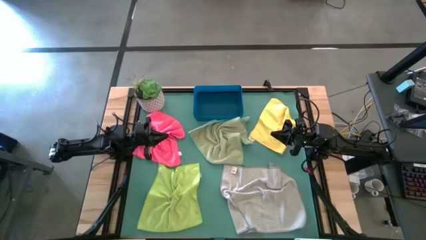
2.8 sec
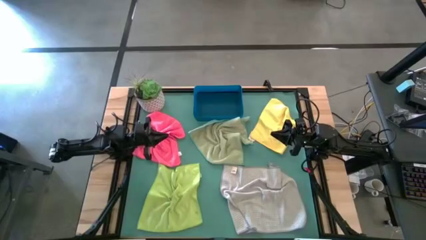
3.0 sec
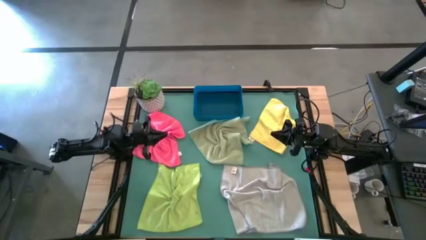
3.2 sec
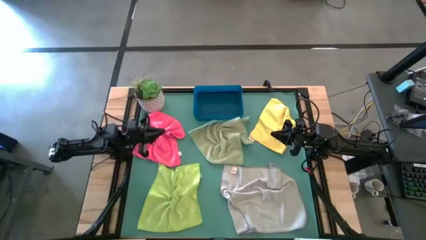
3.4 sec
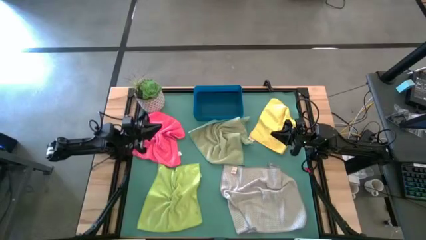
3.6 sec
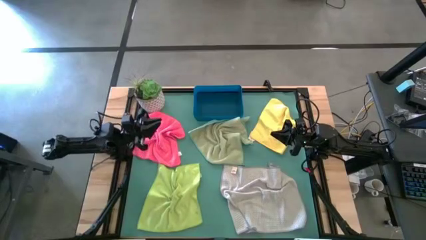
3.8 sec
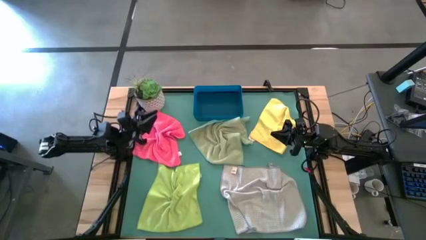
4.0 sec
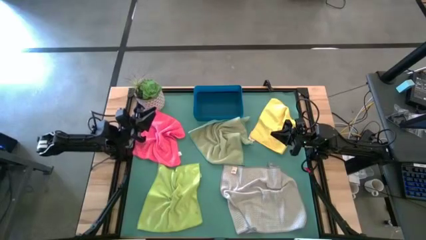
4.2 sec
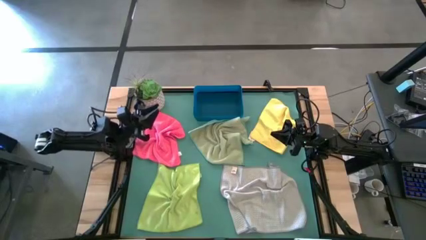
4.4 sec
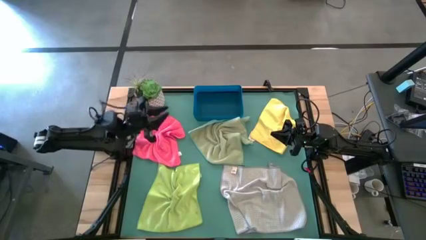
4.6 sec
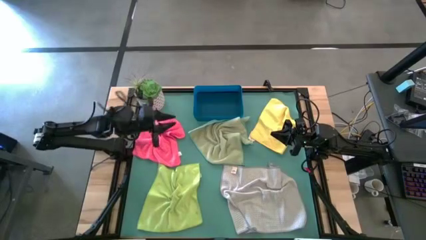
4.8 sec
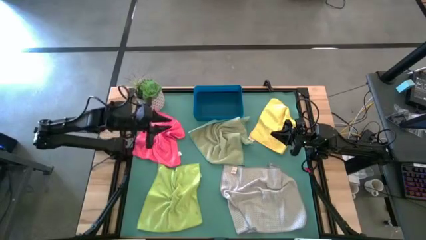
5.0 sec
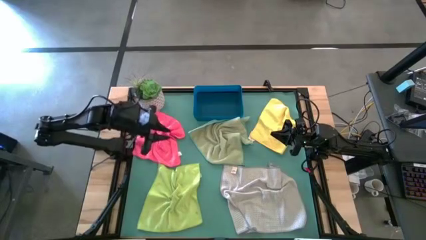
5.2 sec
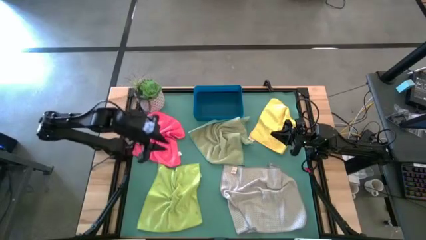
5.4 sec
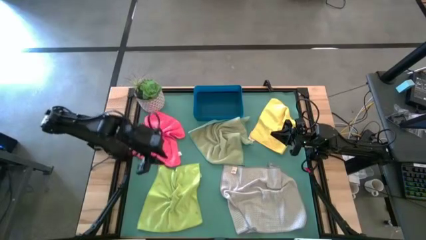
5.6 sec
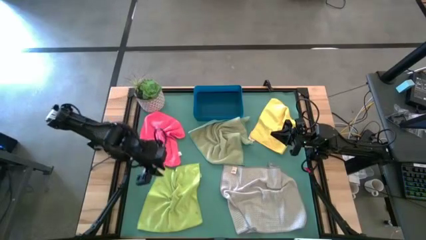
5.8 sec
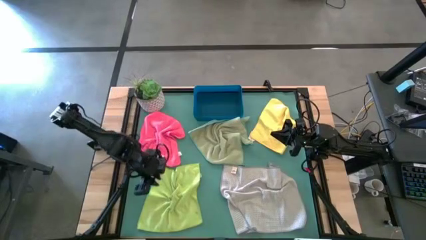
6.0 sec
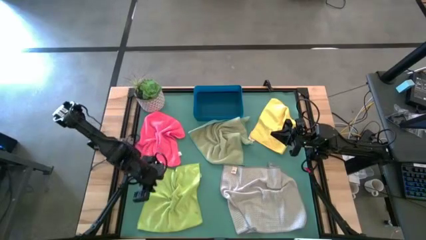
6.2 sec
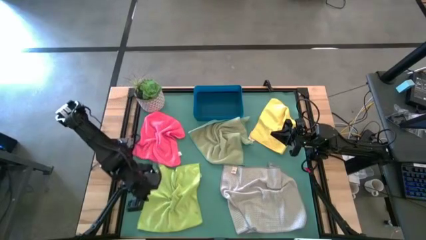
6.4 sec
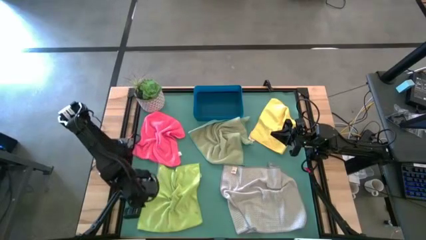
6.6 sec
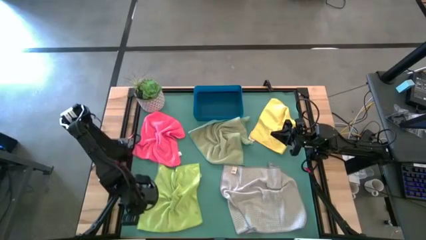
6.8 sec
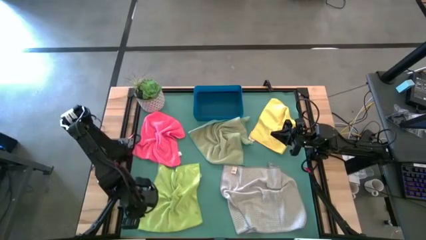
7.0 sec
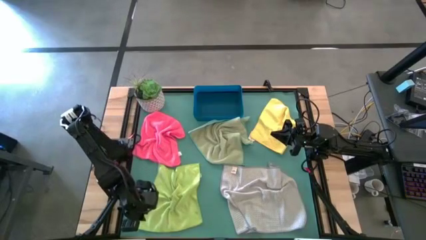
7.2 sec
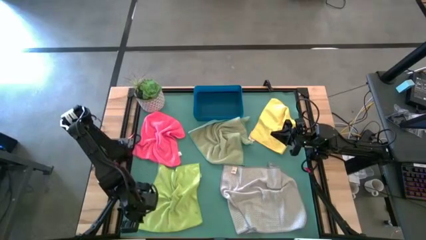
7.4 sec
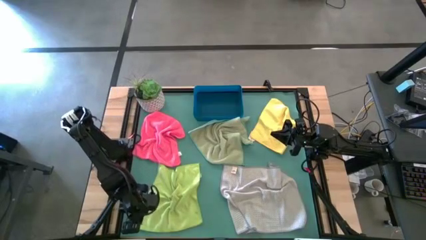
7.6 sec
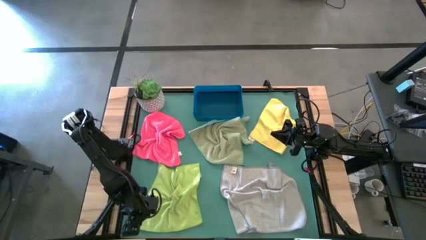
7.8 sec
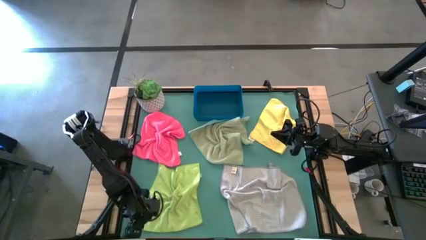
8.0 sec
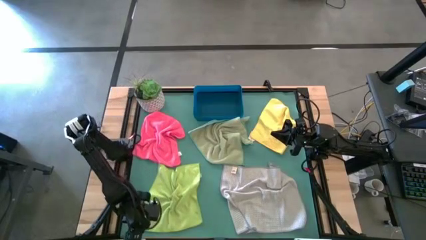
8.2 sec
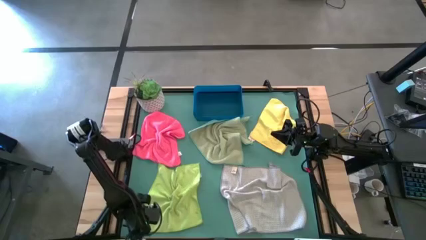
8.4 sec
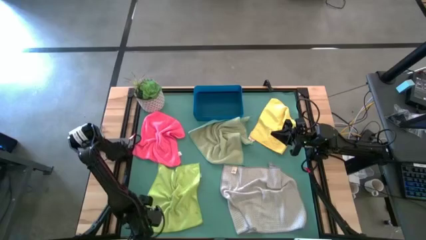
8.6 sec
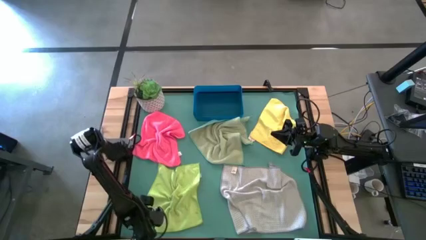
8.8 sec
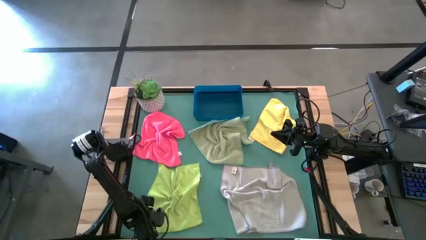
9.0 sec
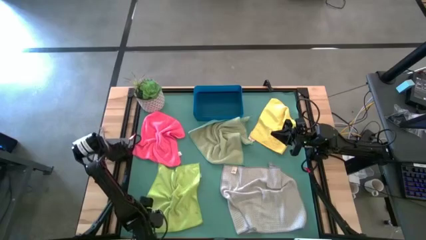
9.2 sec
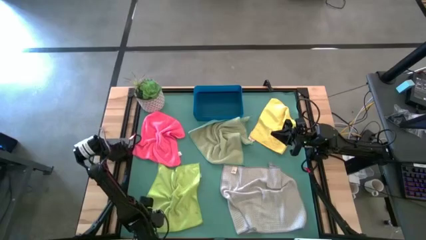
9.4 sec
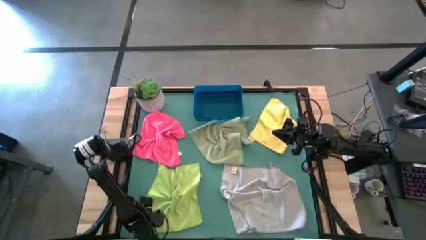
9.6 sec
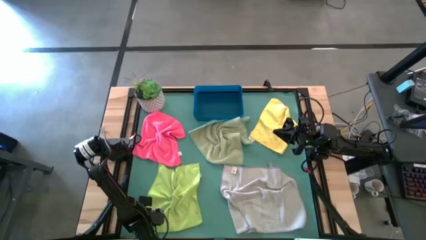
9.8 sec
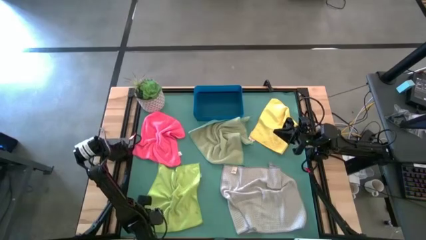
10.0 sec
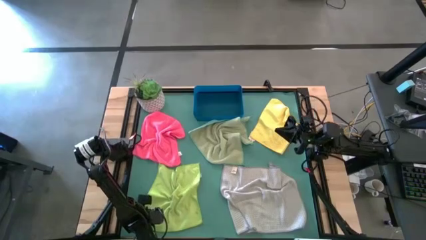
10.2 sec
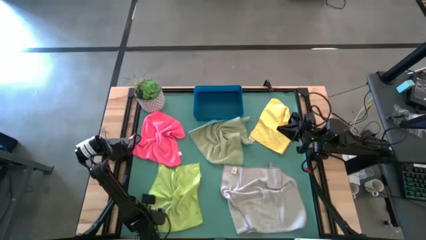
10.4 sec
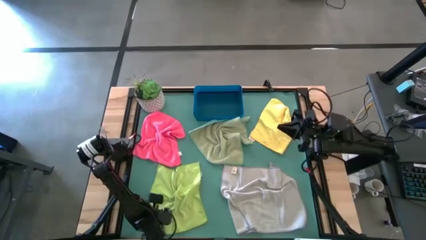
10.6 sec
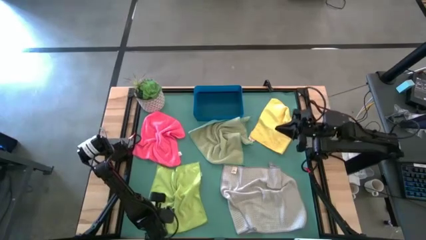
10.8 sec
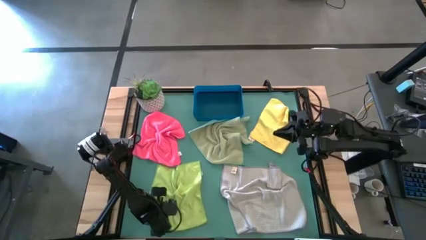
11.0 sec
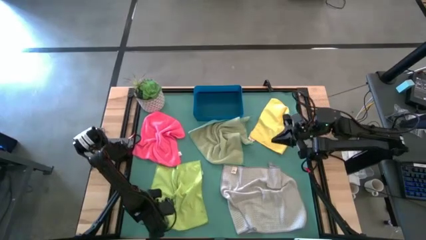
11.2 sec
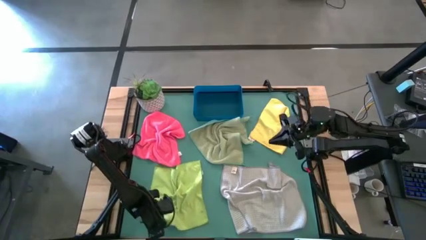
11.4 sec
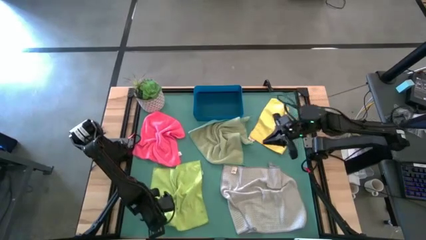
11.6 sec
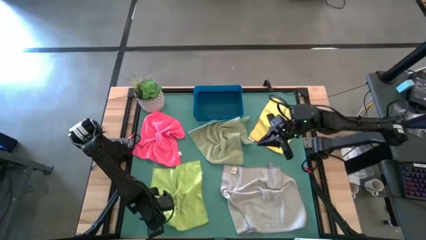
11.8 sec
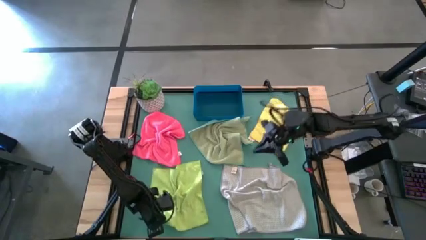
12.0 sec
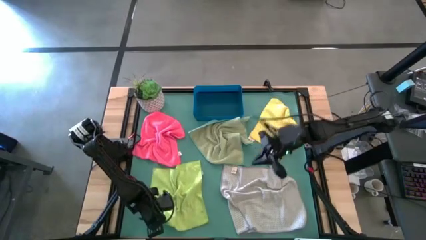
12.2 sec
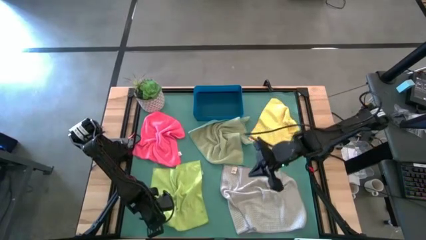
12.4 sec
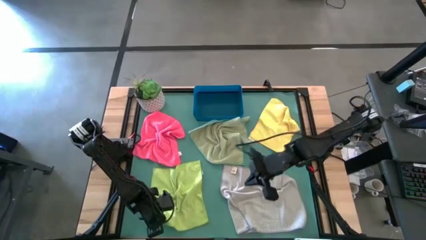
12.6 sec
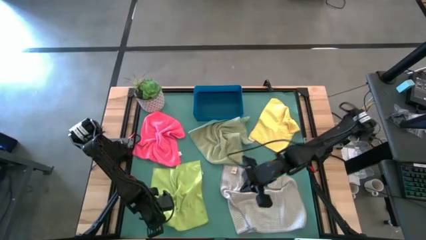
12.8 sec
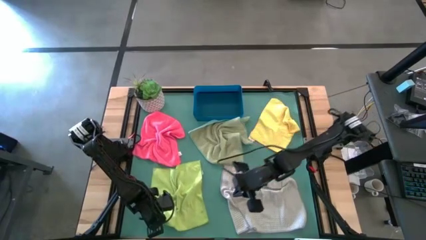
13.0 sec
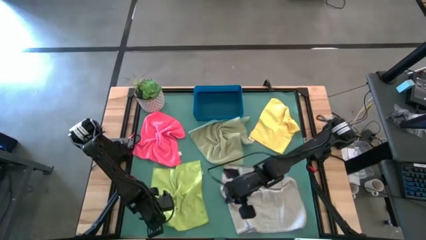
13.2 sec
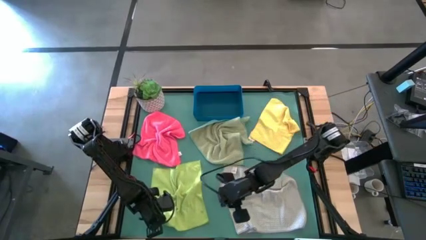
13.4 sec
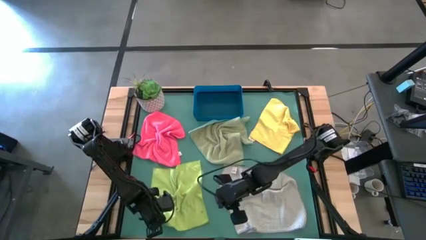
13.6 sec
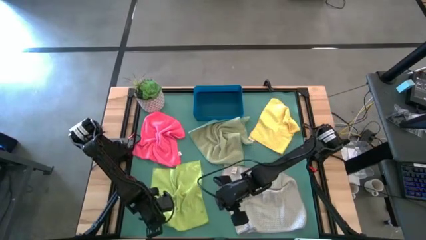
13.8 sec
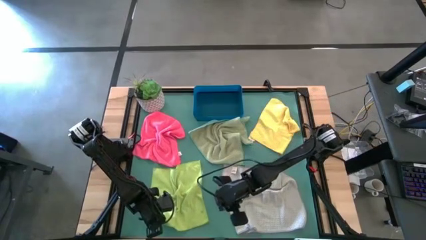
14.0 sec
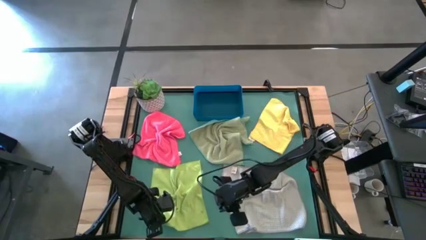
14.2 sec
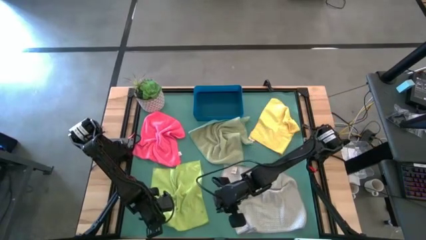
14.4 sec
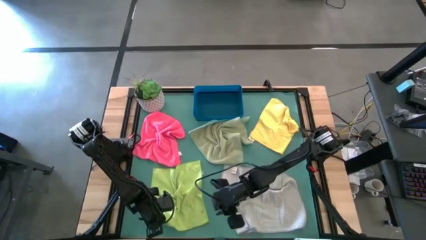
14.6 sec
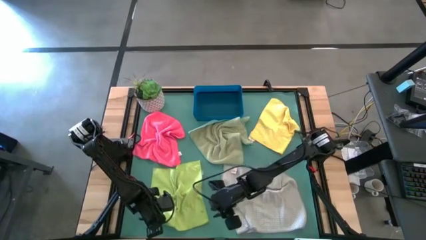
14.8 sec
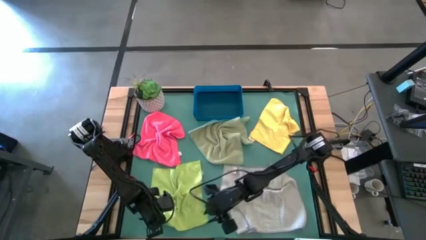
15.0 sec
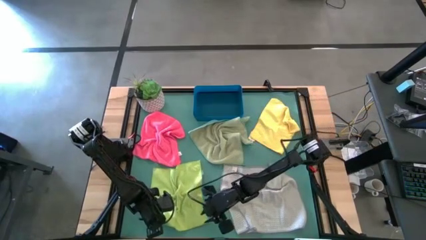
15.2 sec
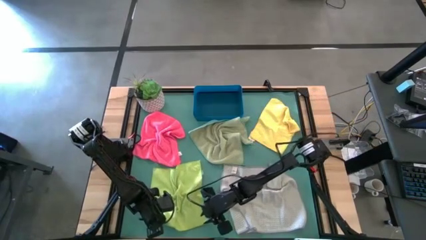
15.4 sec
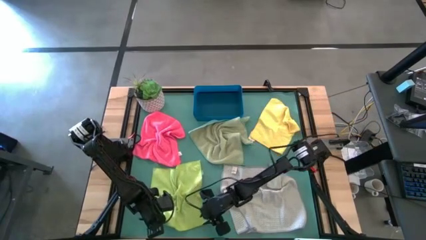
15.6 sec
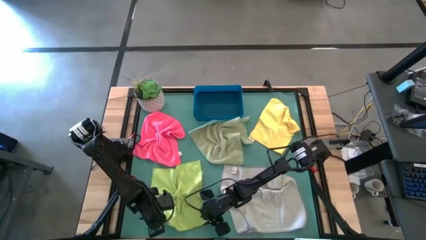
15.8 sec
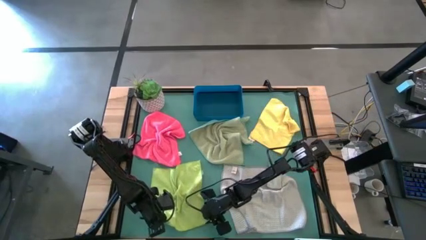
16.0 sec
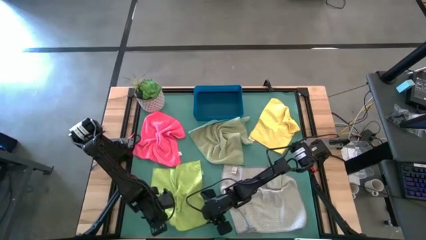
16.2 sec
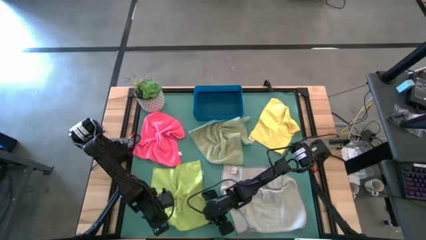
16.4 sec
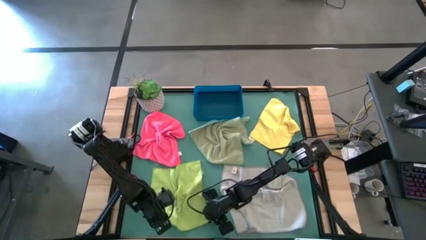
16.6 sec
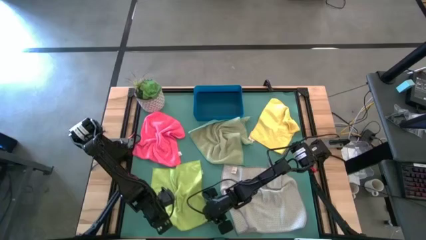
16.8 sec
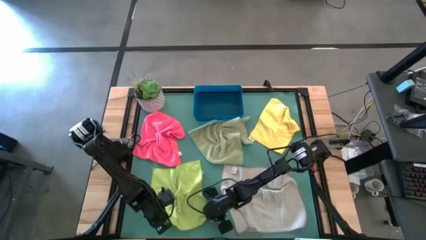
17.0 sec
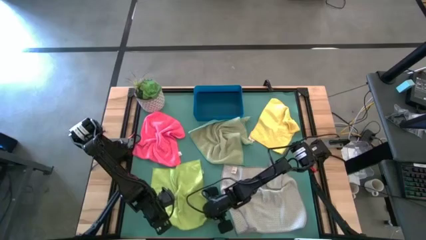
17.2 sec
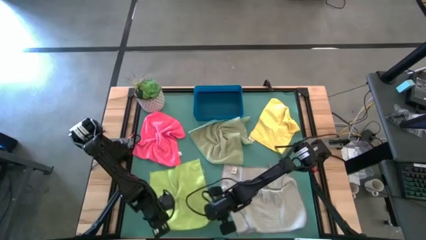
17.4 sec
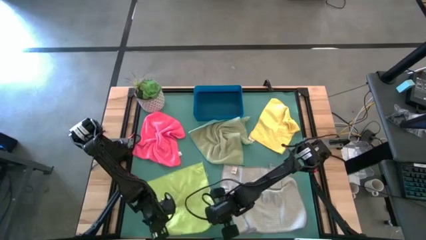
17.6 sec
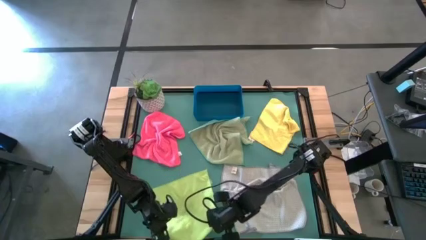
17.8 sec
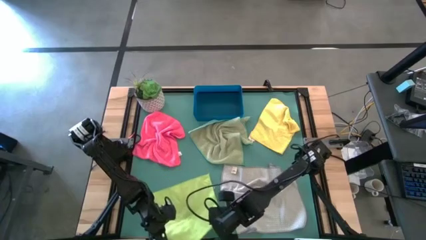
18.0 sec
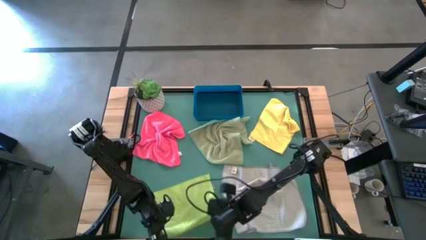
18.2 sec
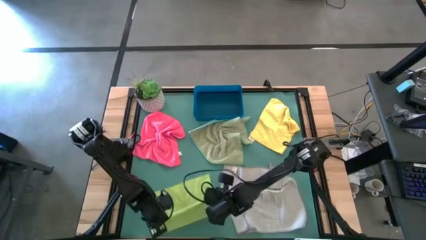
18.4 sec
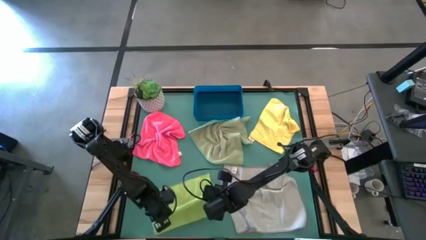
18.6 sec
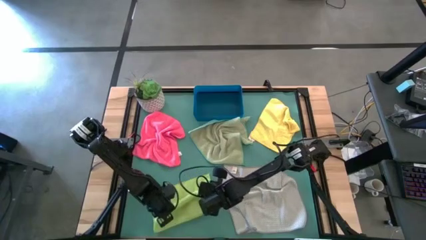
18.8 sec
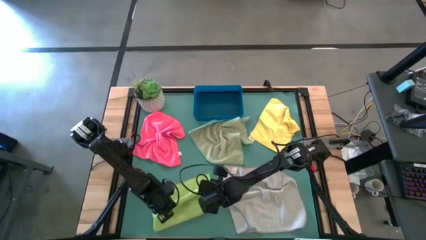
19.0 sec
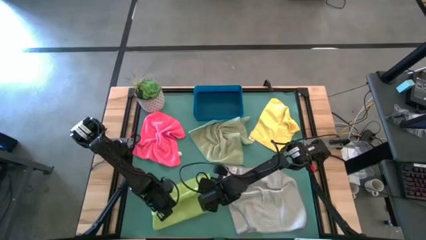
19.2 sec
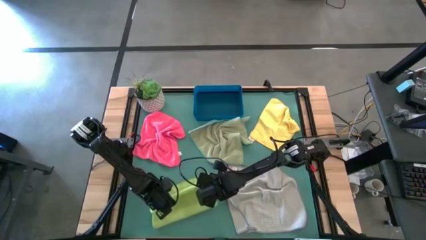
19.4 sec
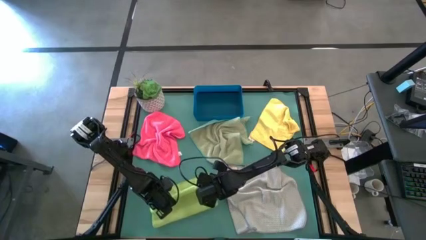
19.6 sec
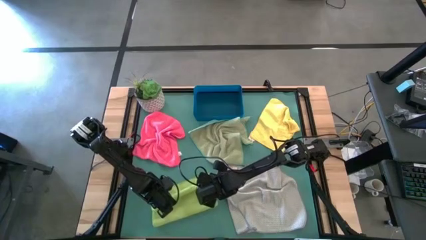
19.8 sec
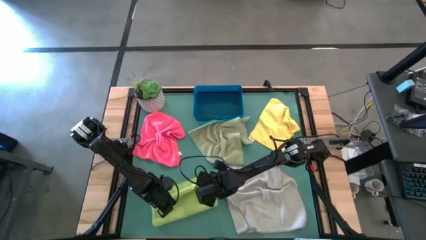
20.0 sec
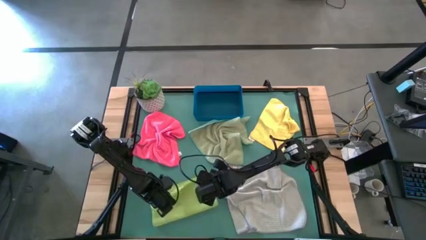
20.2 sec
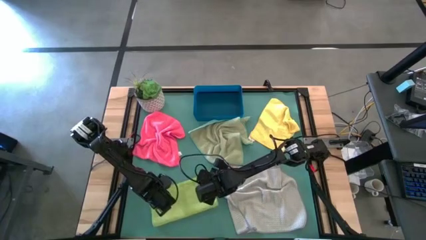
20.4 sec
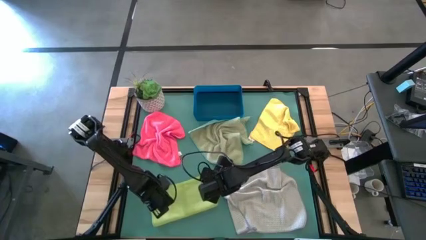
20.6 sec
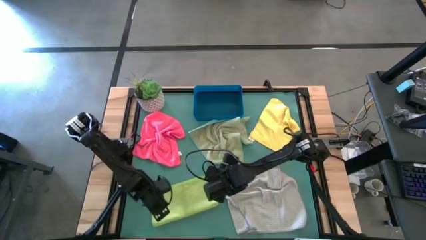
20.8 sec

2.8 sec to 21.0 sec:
Task: Fold microfiber towels
Fold the green microfiber towel
